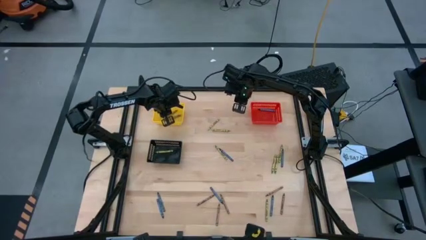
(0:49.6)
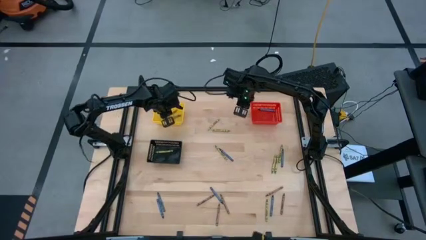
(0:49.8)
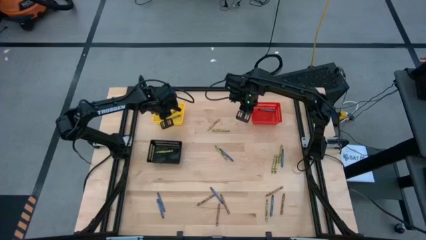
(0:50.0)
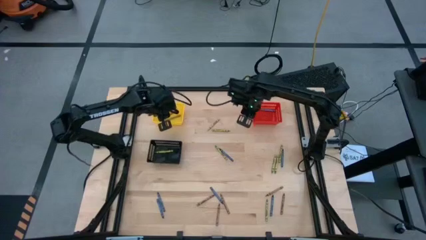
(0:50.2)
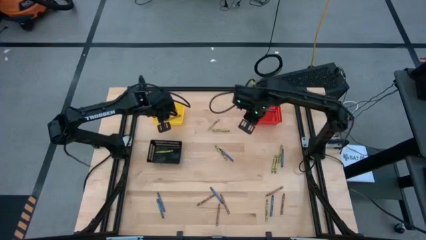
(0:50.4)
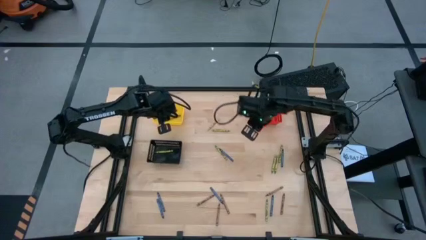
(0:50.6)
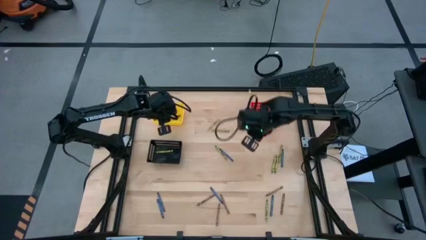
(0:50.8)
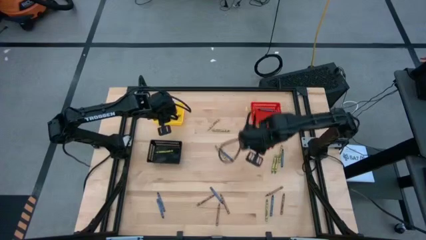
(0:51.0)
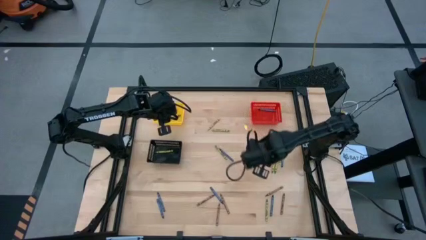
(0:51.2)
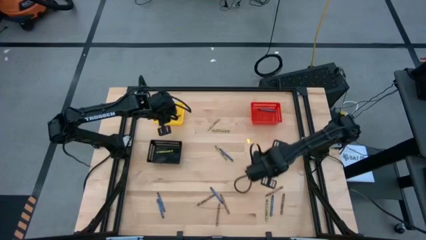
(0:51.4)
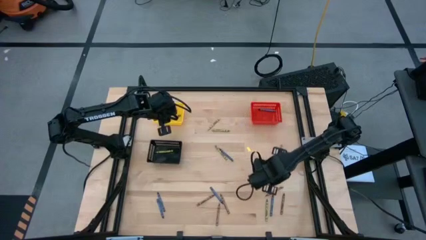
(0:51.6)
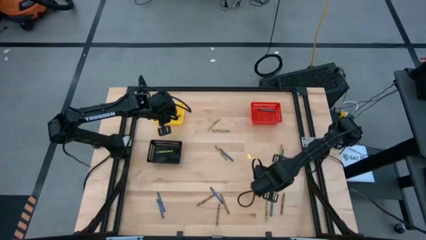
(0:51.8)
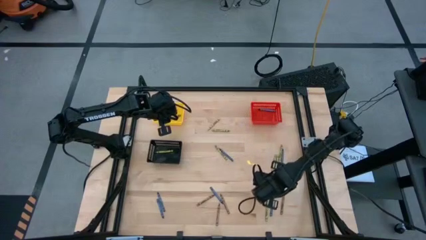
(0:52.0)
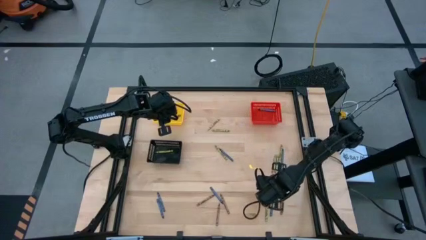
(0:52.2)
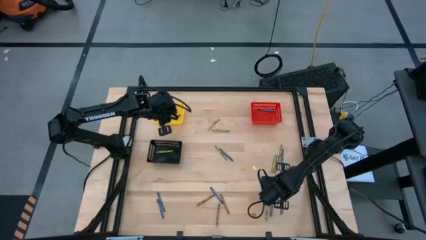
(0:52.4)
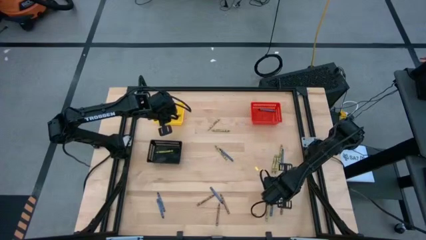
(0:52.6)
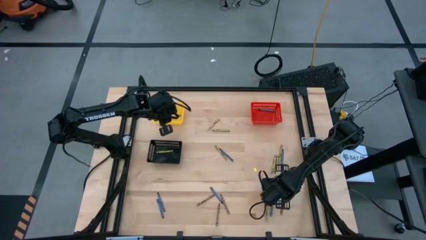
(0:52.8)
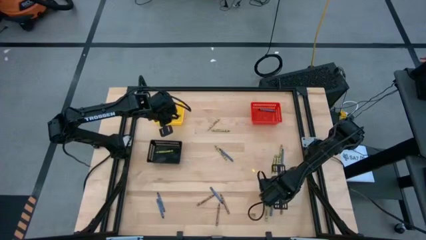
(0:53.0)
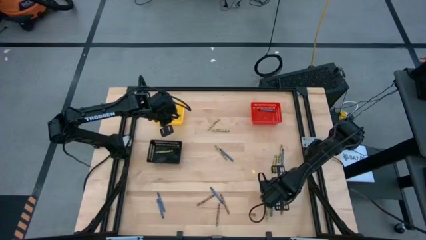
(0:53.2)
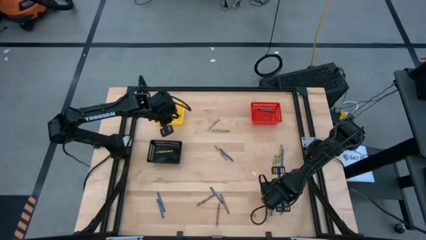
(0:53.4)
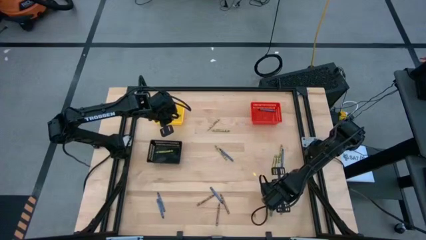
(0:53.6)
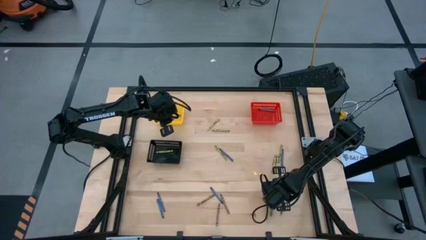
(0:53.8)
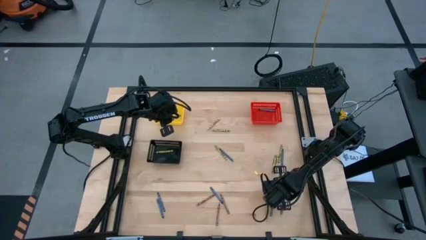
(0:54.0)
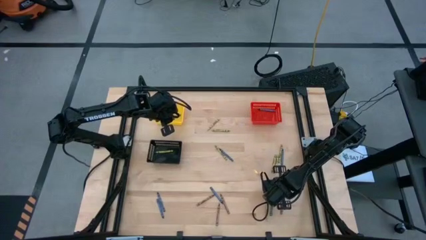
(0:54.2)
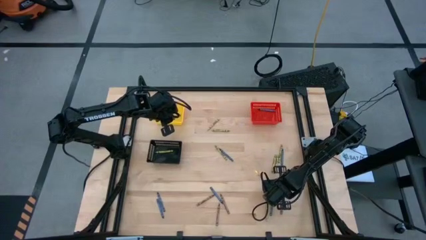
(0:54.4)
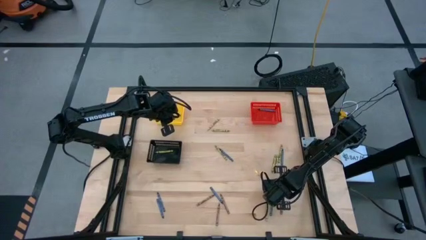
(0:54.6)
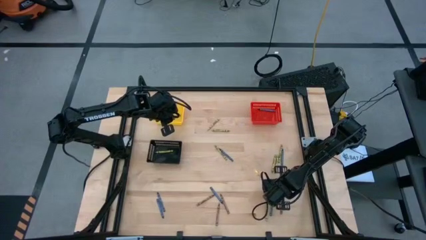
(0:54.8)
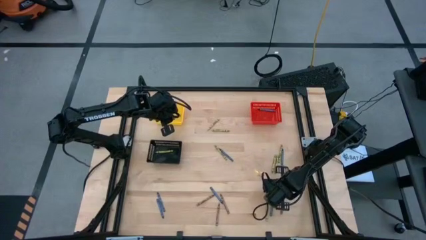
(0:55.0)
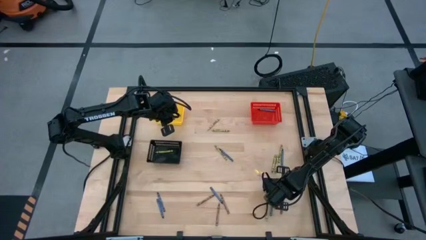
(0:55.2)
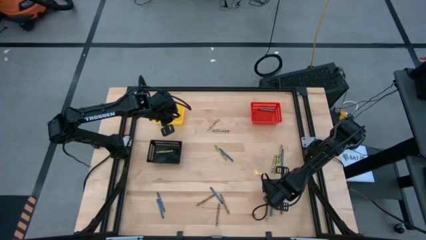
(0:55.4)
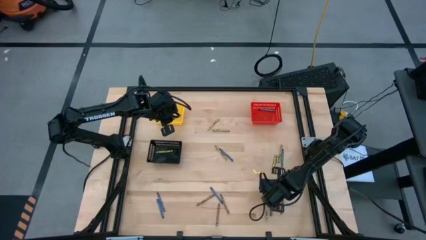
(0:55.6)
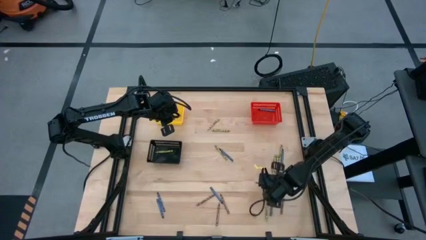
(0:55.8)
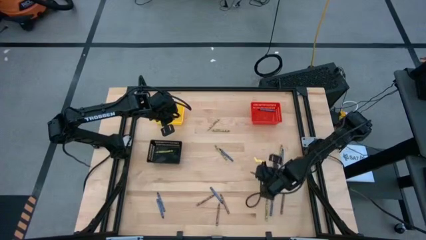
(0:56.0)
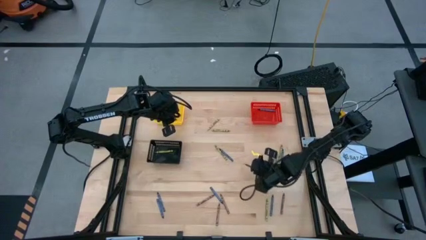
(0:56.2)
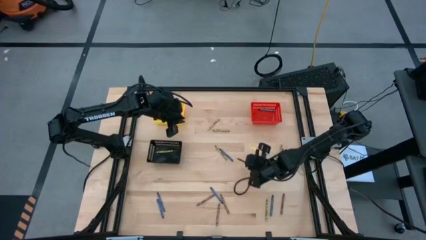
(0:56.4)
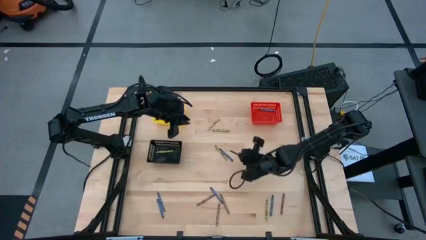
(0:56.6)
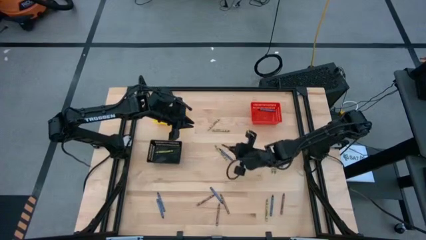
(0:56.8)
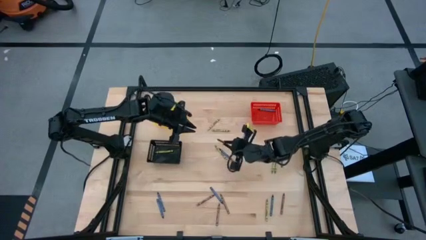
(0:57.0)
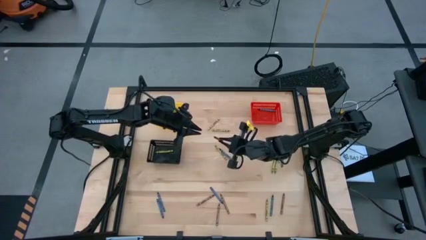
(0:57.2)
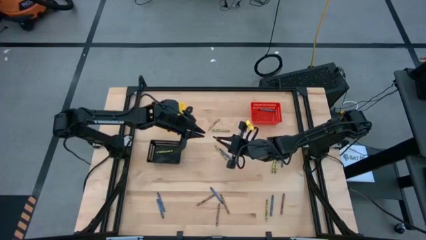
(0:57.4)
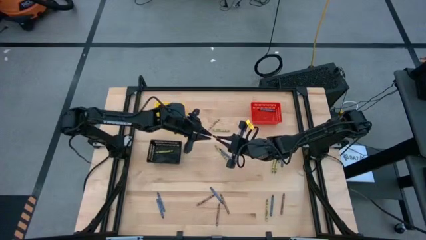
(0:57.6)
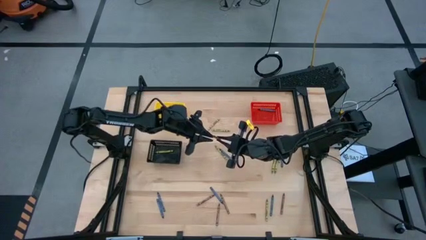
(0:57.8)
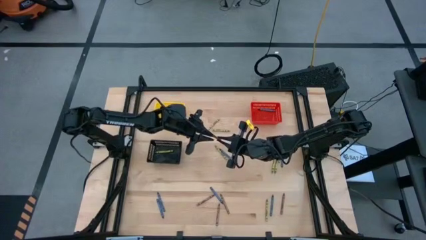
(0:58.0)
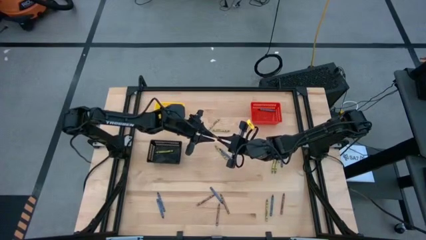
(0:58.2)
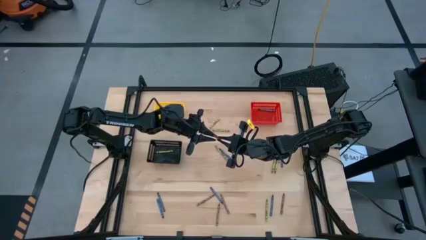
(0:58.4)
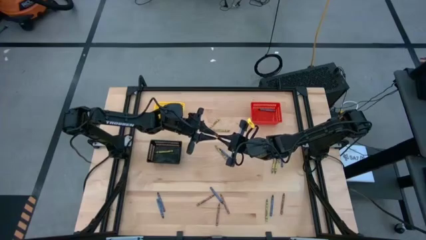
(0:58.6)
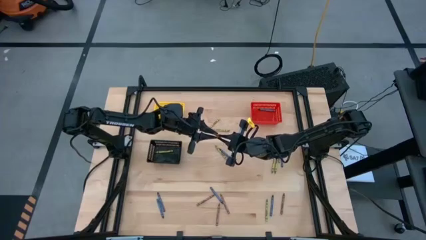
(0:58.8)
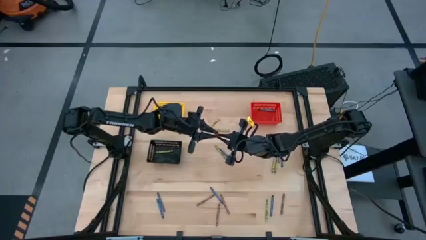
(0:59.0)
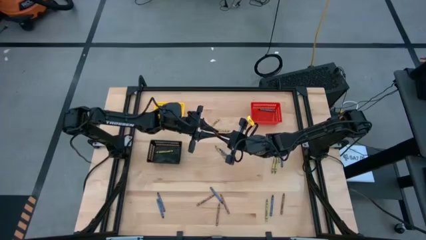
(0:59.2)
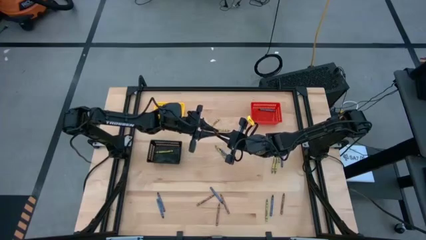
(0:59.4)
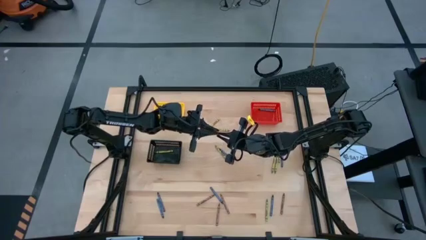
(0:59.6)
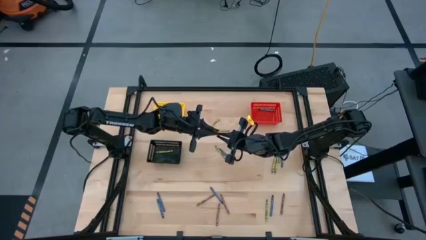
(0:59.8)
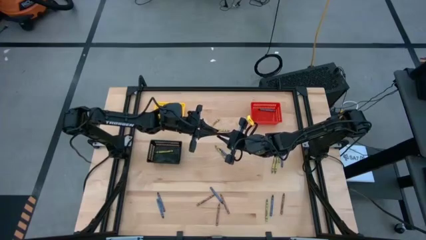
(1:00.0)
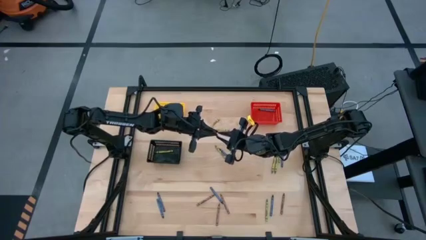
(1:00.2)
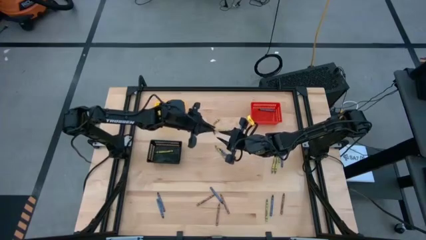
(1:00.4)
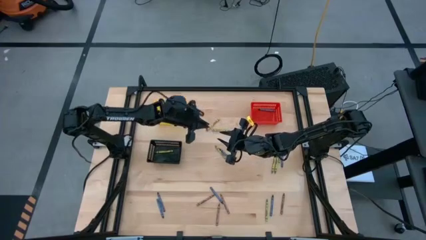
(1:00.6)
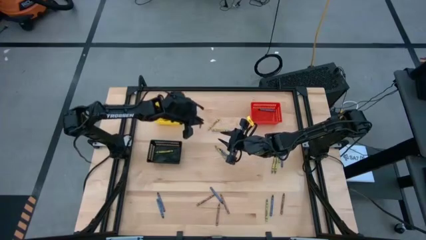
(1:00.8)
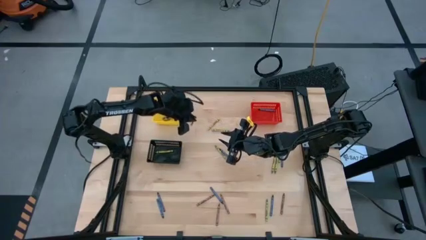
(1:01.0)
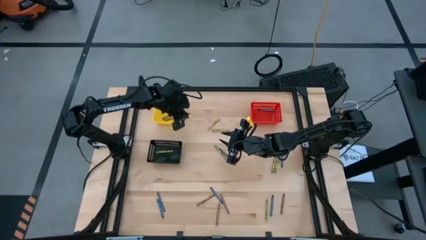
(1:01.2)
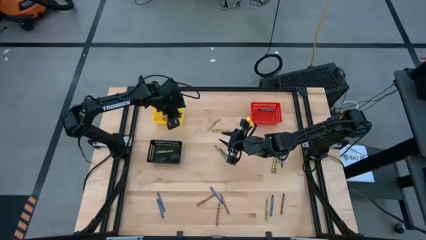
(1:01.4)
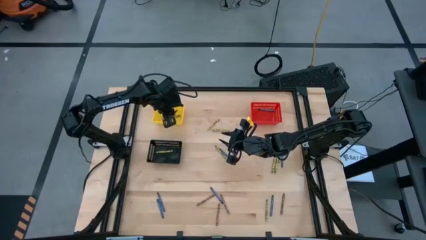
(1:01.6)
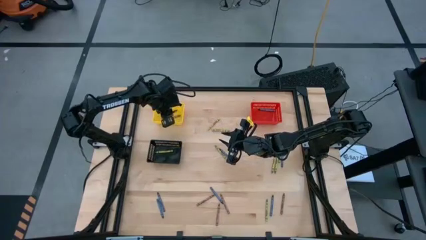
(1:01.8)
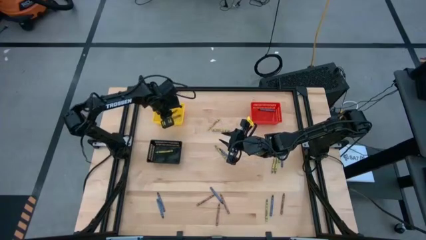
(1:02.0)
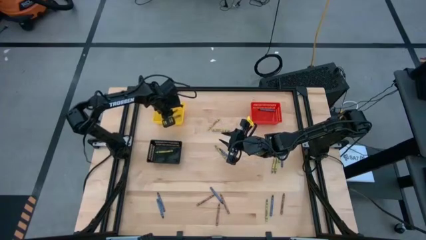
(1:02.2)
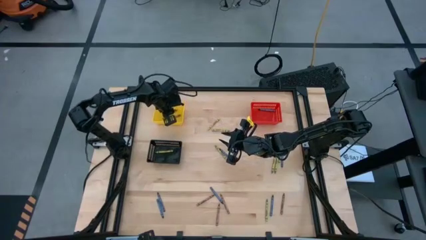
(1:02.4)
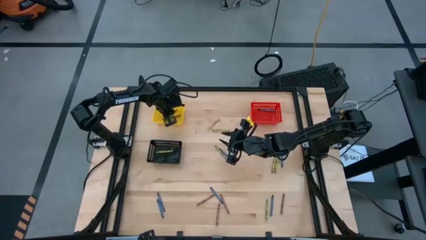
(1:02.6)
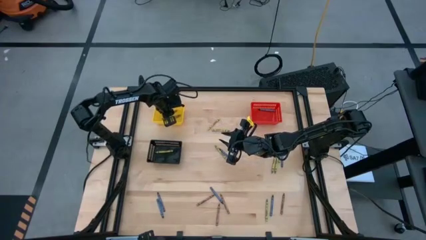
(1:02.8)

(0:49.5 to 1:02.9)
Task: Sort crayons
Put the brown crayon into the yellow bin
